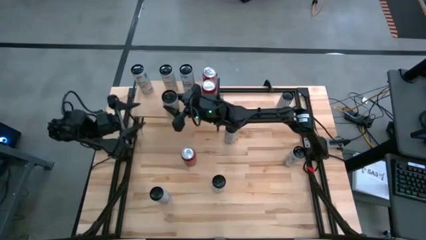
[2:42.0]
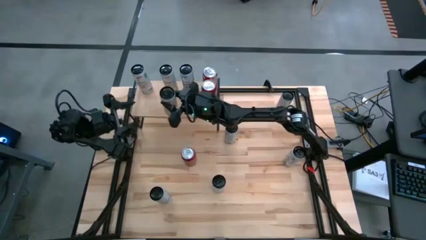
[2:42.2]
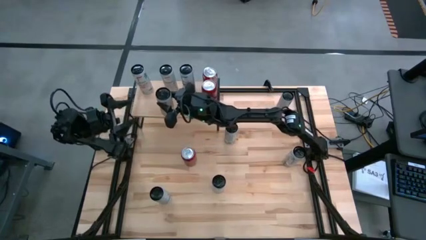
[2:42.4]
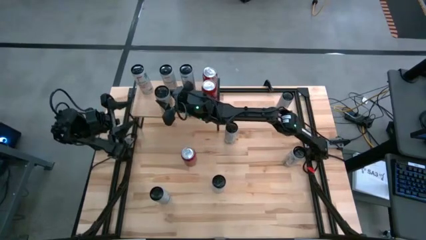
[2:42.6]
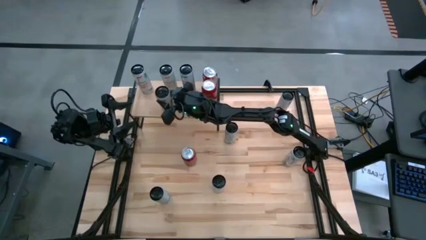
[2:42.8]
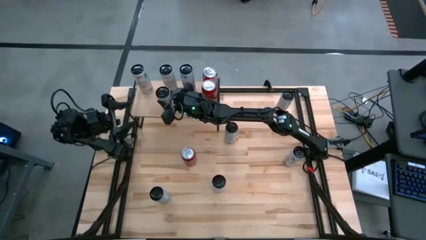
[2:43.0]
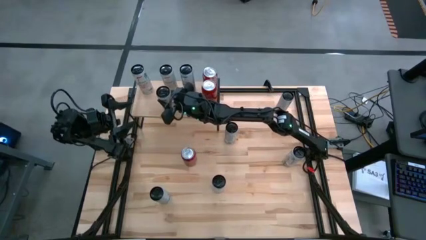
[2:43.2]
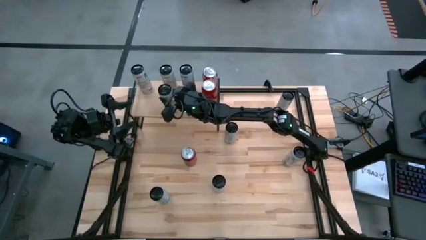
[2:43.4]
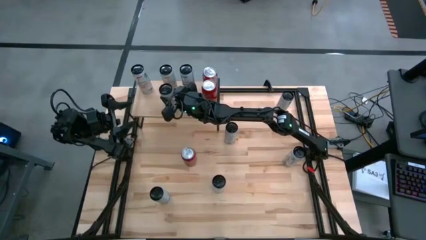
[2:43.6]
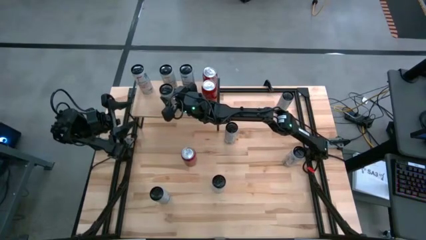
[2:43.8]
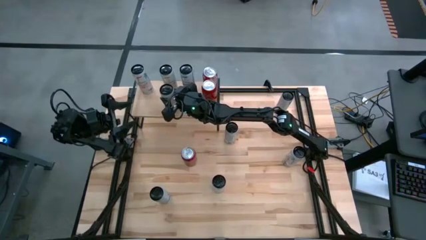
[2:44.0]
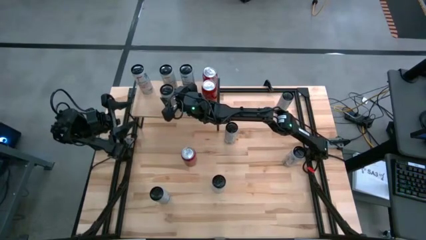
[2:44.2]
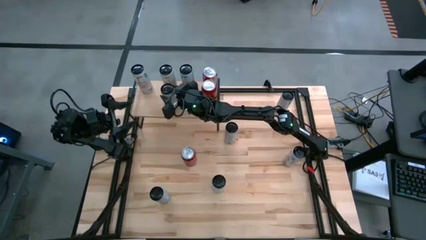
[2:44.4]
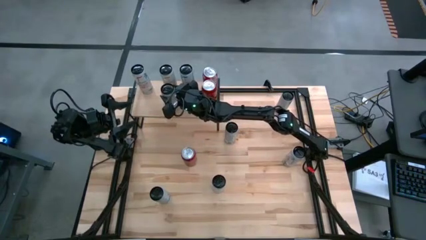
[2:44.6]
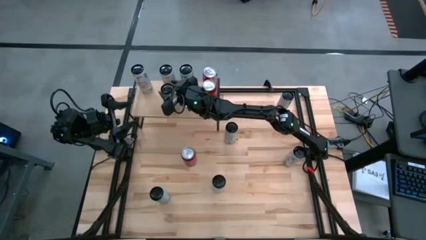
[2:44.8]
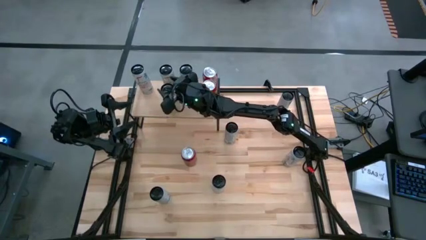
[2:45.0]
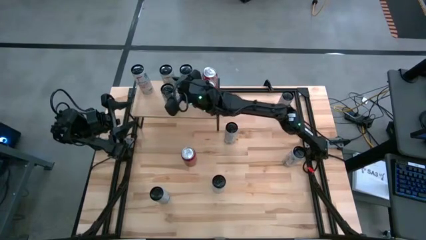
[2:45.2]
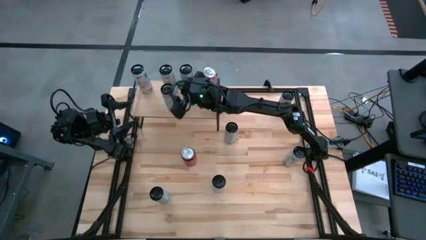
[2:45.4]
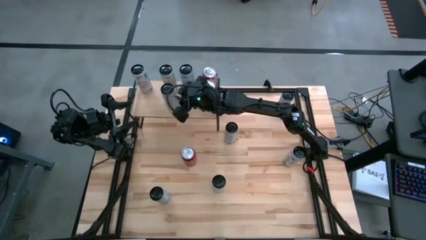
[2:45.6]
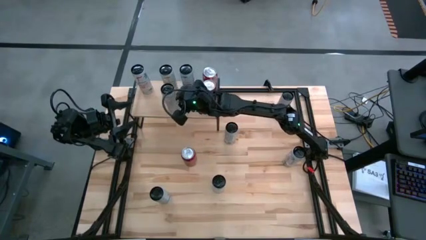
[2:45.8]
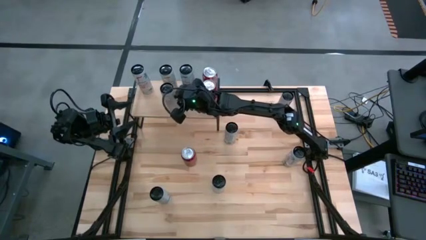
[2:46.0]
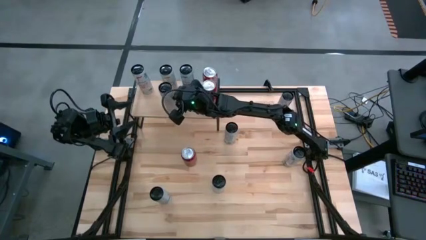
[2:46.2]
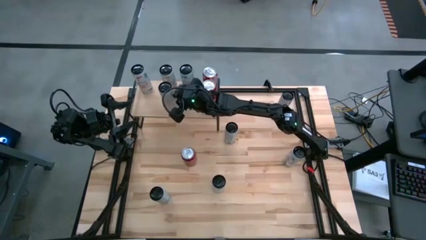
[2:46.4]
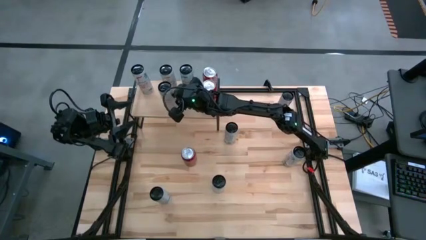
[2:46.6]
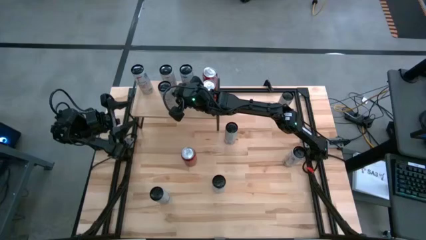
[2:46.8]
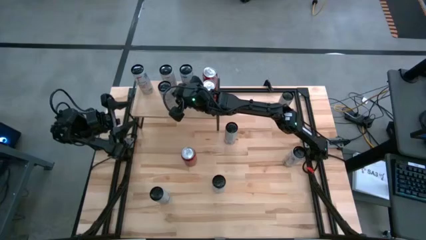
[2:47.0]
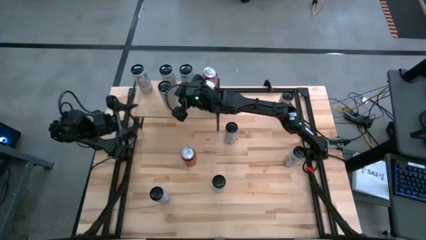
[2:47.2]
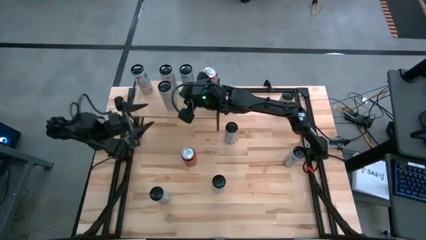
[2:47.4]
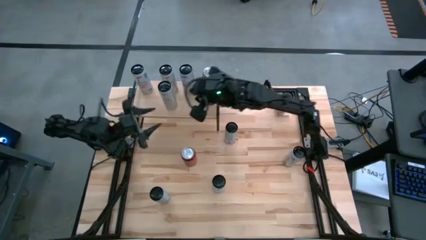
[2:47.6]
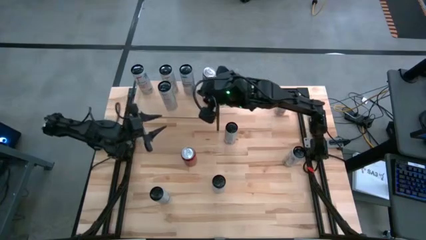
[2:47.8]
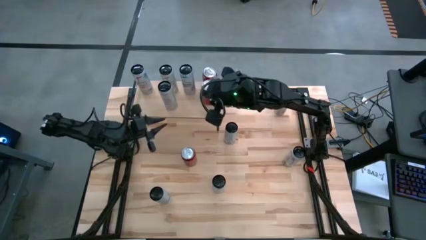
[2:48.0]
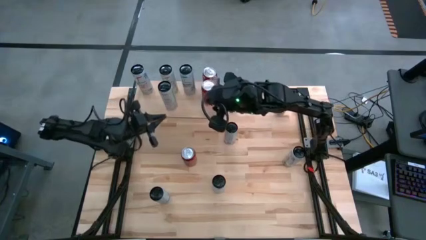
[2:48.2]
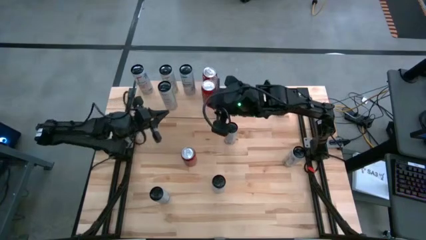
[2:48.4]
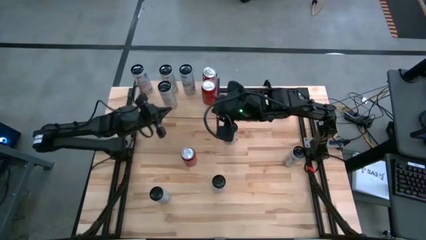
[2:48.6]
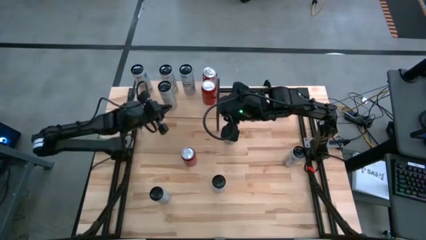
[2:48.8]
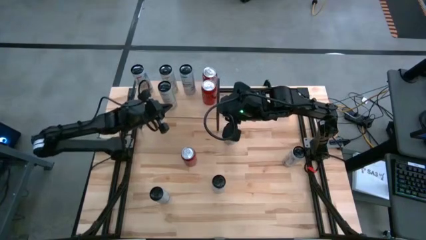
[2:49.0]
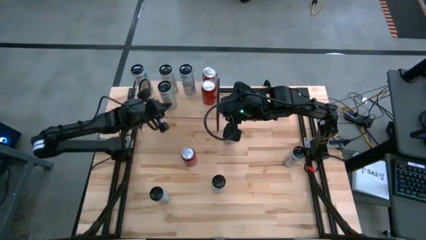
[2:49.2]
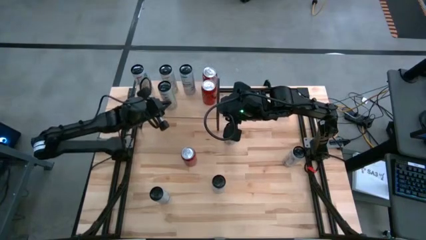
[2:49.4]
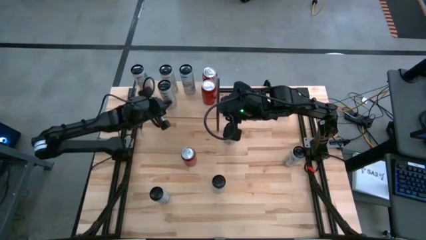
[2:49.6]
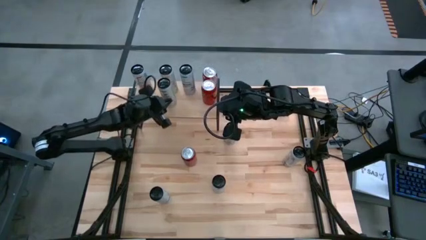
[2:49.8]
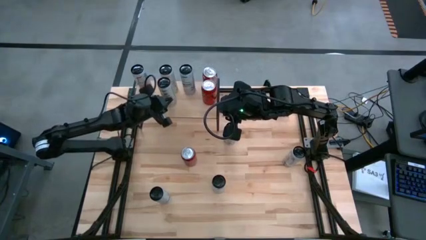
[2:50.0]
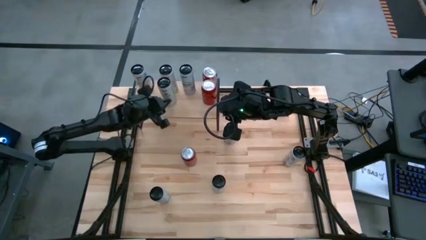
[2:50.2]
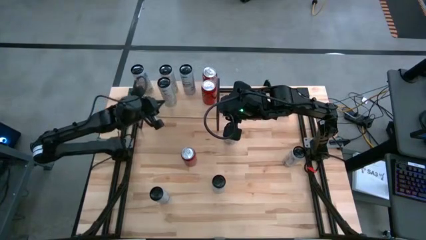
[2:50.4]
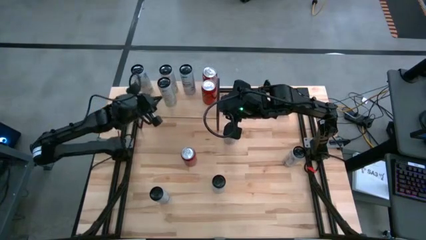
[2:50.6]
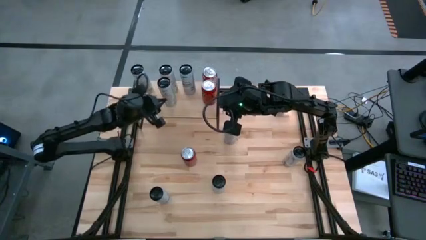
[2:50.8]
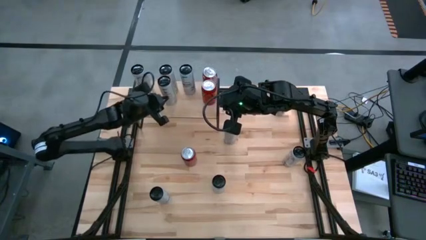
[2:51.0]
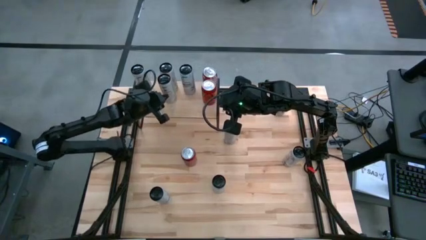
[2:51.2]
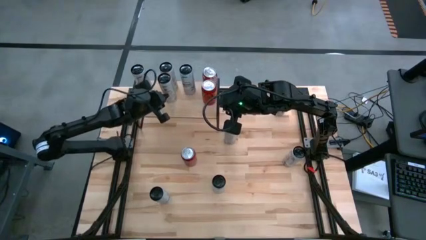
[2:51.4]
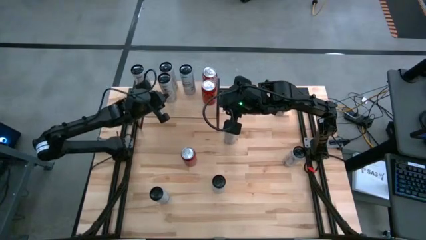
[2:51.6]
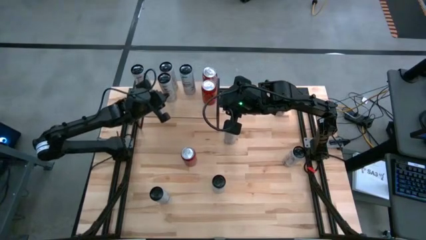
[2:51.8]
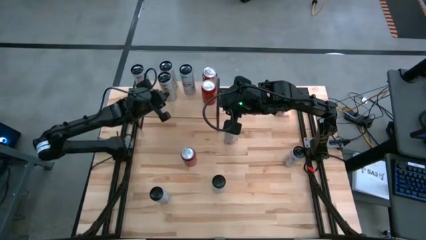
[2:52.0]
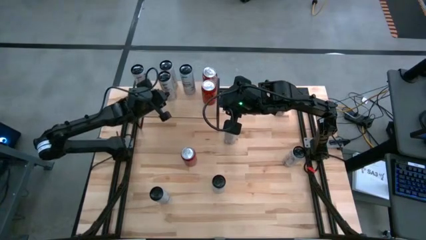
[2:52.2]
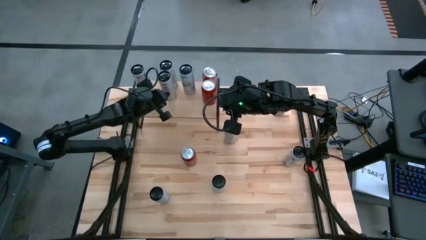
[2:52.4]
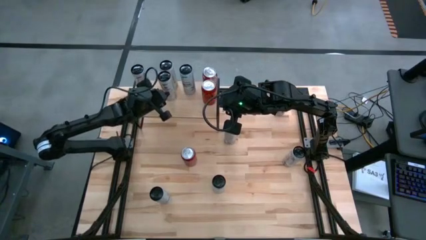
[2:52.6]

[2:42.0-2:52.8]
Task: Place canned beverage on shelf
Put the bottom white yellow soda can on the shelf aligned with the other white yellow soda can

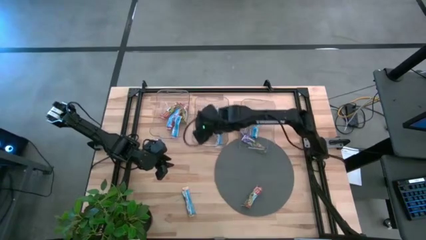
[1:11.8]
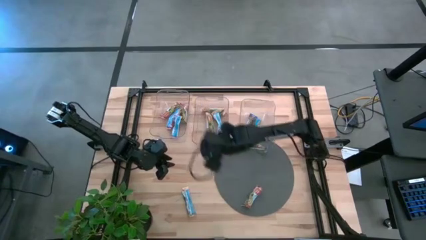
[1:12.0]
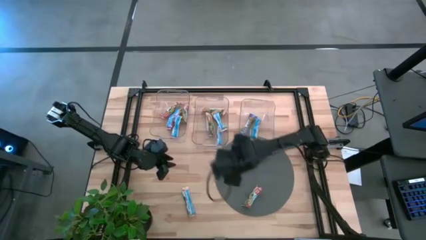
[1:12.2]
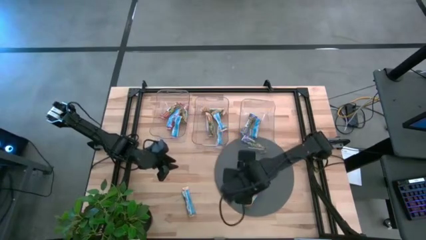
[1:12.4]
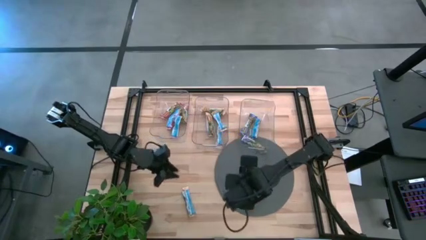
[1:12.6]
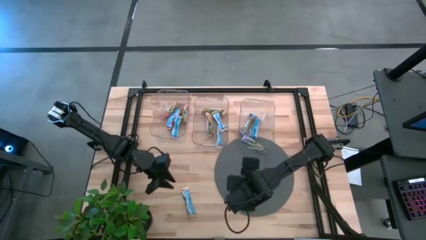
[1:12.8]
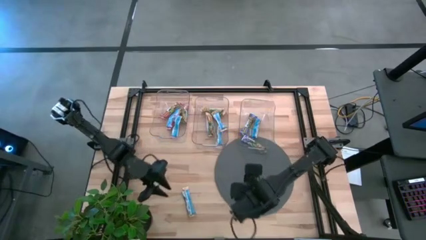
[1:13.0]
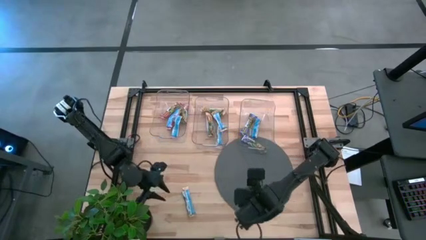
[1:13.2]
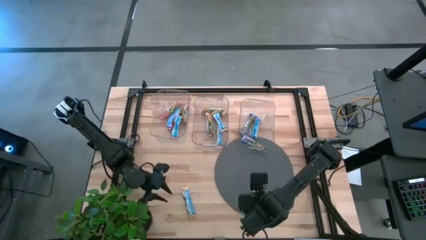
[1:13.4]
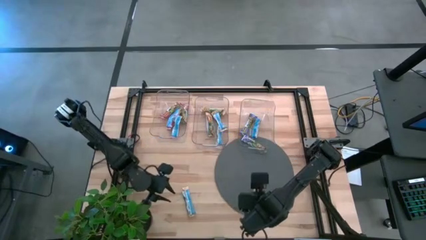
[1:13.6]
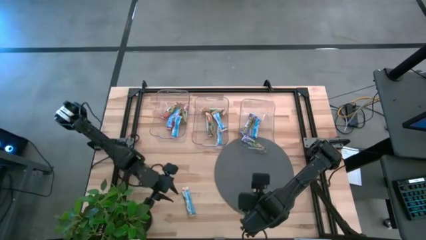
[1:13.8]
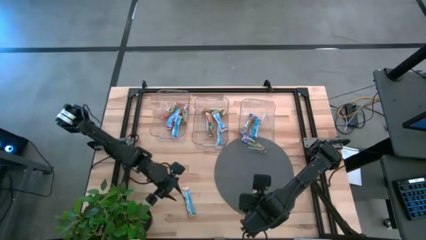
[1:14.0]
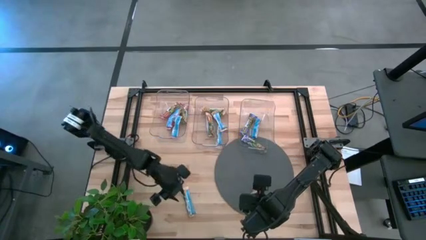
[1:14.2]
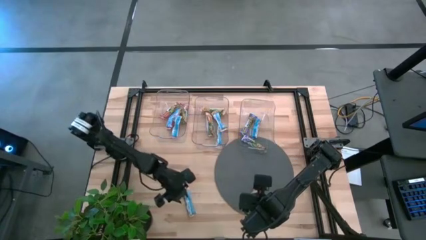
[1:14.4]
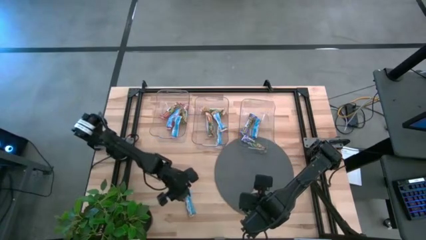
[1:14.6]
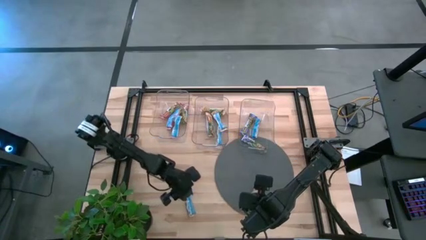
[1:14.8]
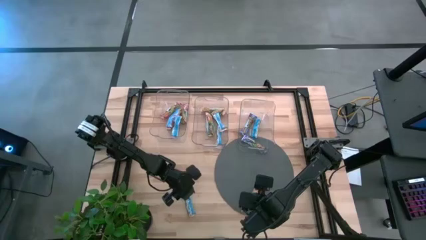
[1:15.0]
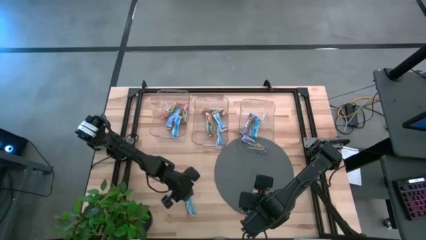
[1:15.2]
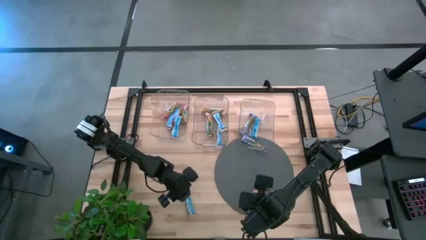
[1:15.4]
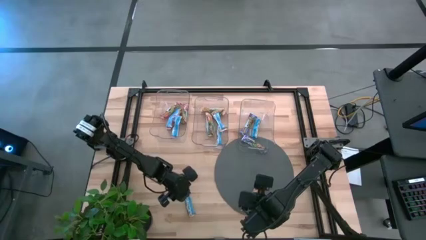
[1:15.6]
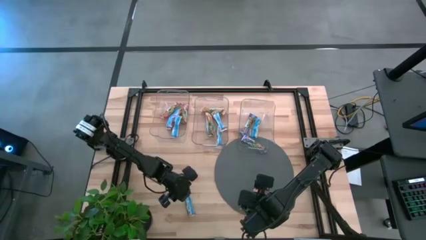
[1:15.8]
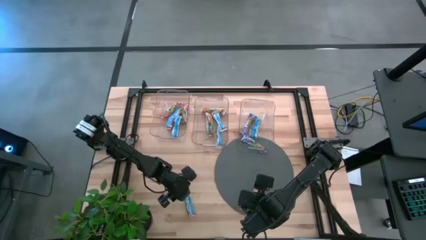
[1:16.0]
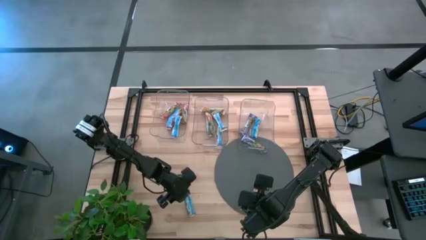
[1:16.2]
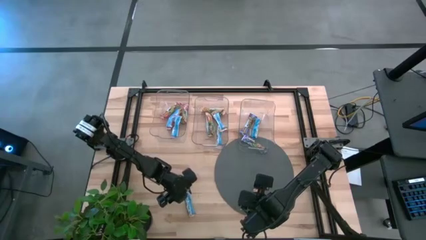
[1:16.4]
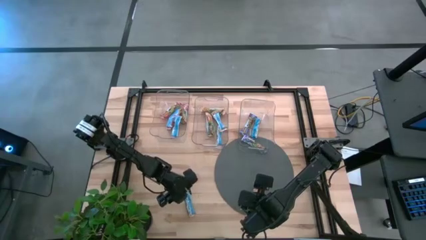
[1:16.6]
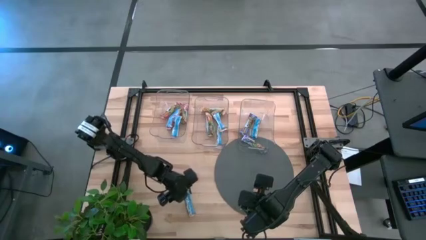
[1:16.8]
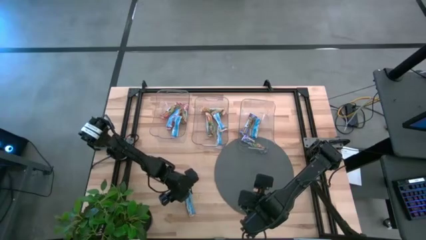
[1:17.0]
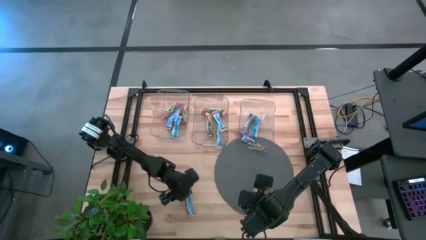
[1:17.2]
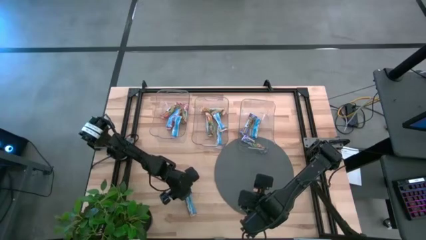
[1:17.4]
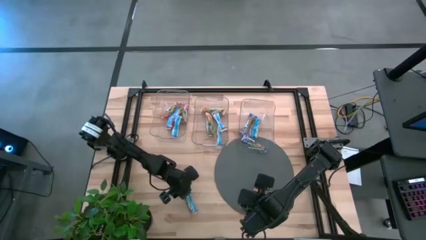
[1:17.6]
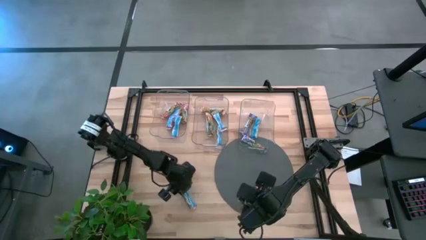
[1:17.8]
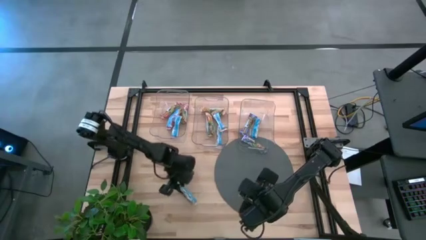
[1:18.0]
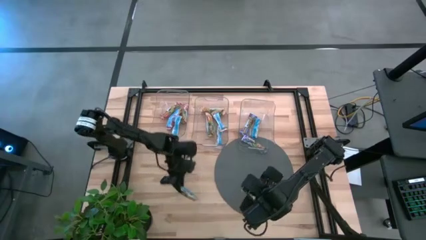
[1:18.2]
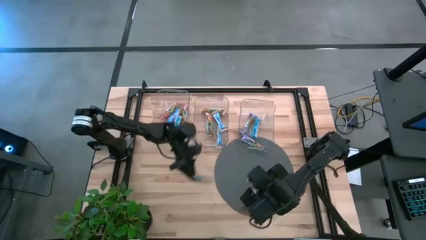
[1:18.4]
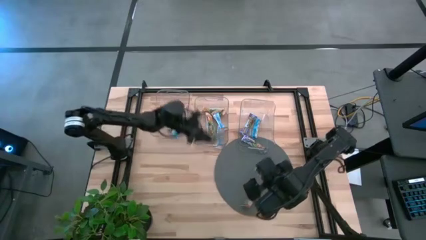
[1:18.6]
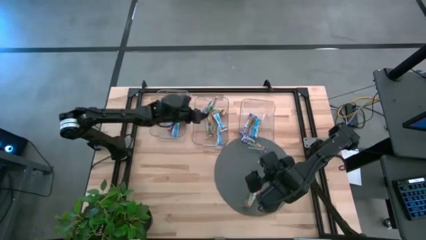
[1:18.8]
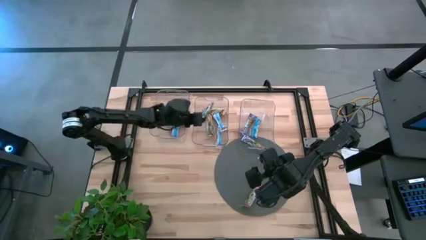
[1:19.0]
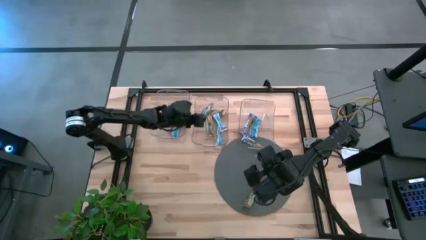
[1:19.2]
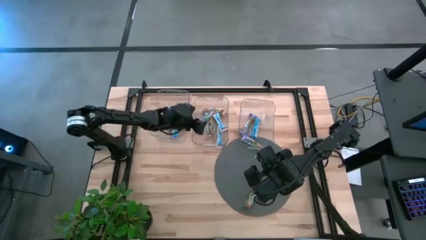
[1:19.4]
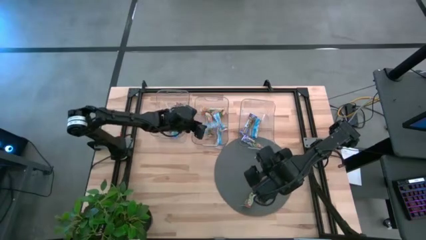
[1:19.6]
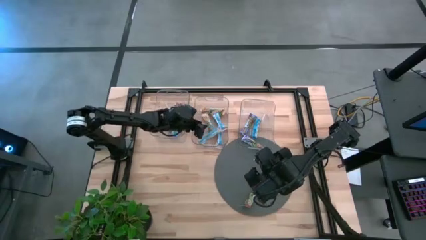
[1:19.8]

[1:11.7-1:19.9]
Task: Pick and place Granola Bars by type
Put the orange snack bar into the middle transparent bin
